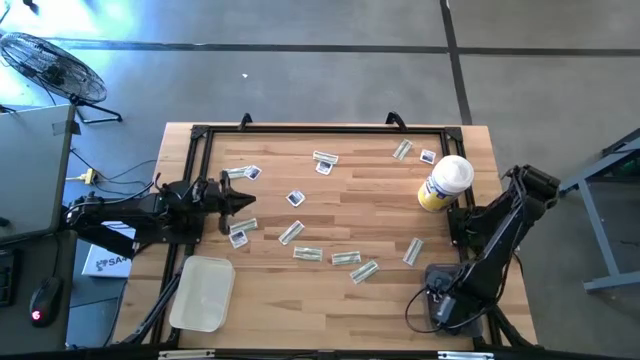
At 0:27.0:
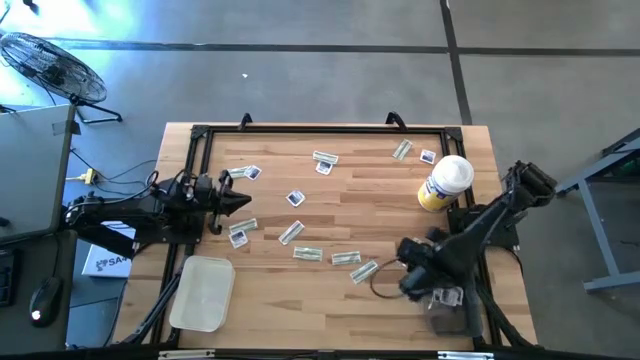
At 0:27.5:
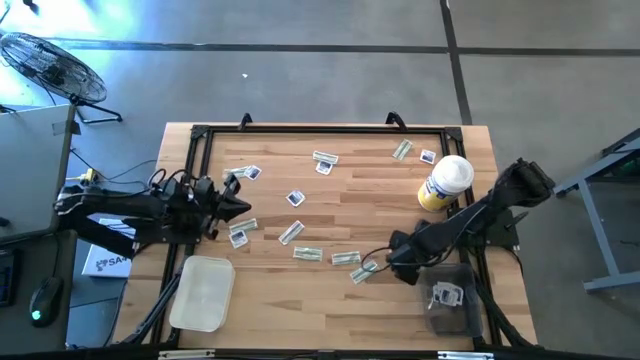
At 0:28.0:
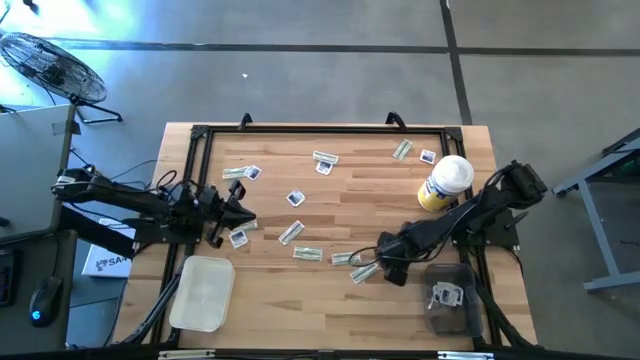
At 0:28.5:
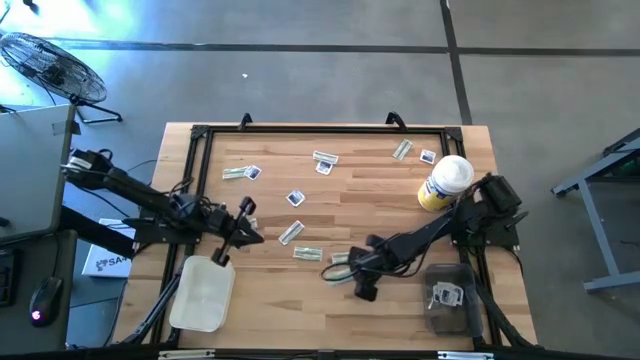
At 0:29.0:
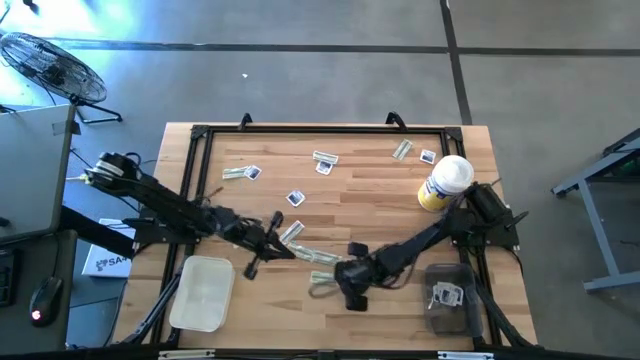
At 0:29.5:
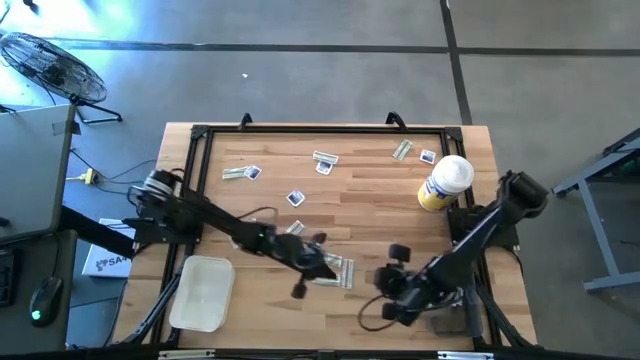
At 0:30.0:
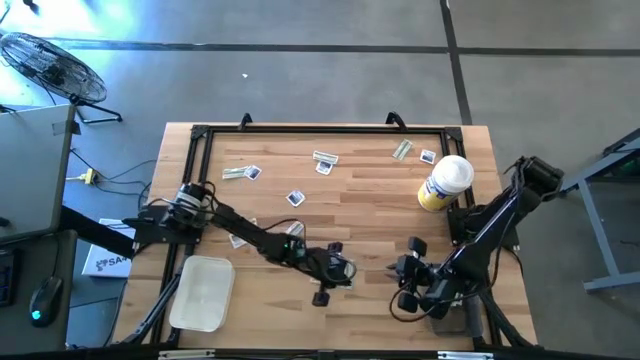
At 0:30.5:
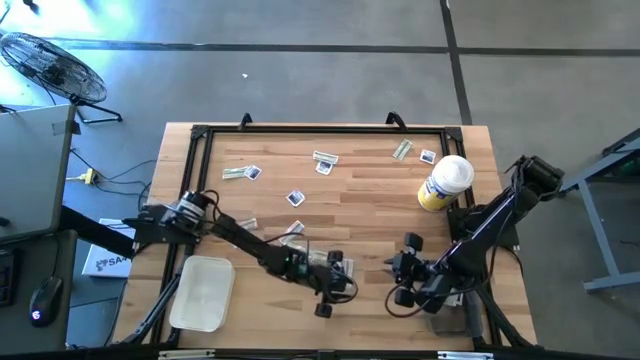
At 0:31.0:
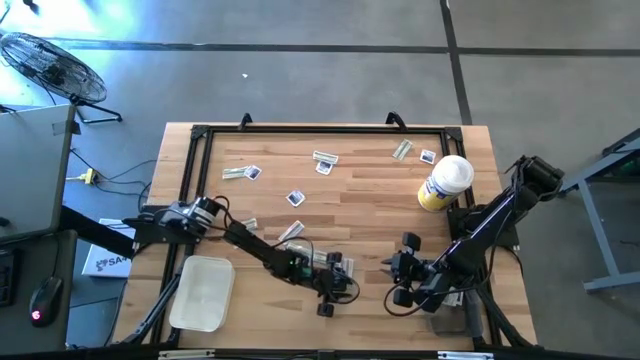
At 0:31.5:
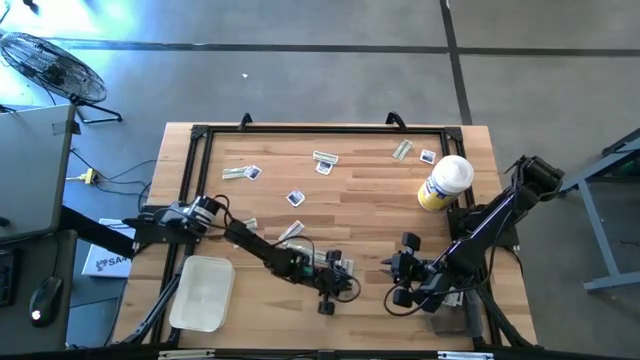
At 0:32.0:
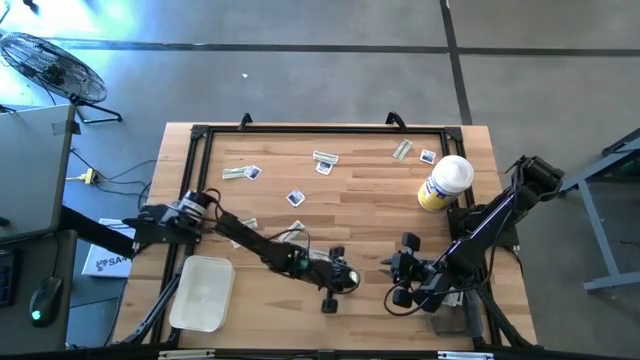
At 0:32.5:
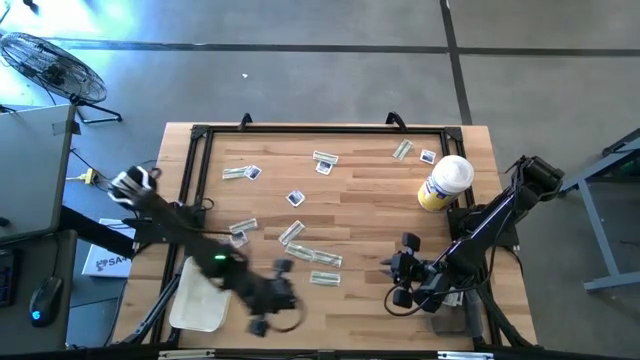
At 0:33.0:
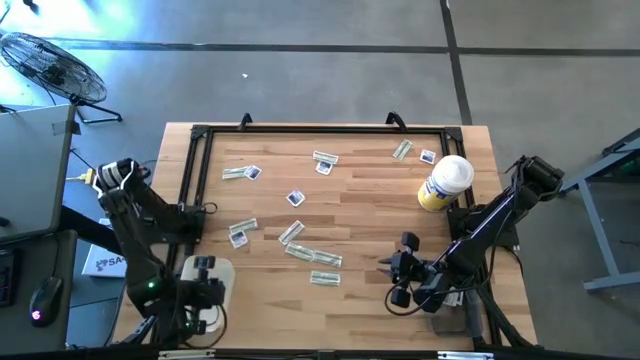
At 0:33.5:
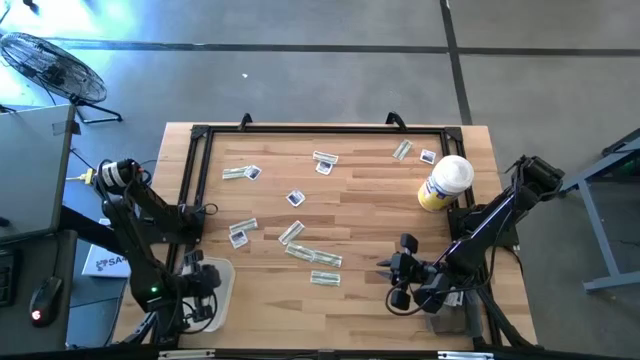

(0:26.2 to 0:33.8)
Task: Pick & Place First Aid Supplies
Put the green bandage into the white bin

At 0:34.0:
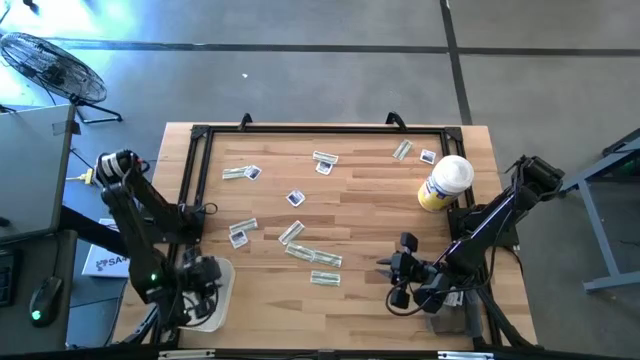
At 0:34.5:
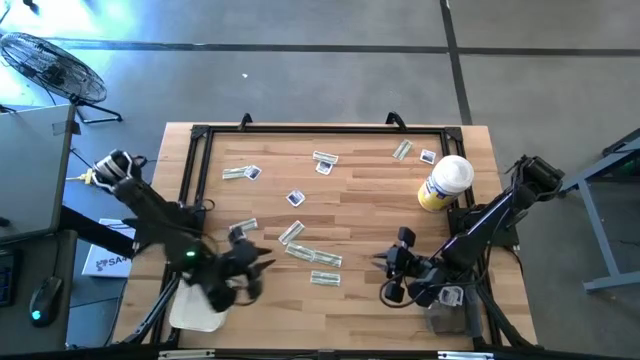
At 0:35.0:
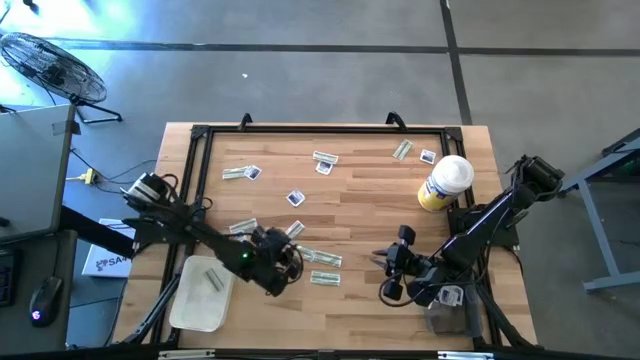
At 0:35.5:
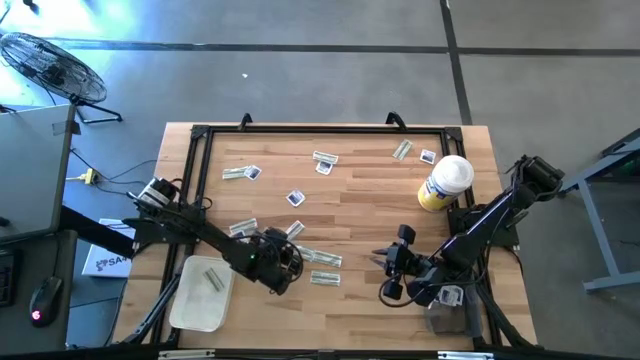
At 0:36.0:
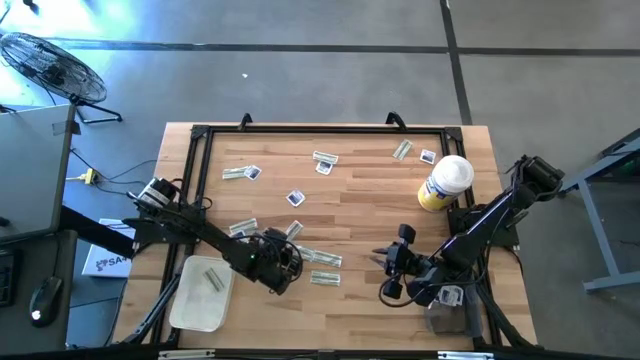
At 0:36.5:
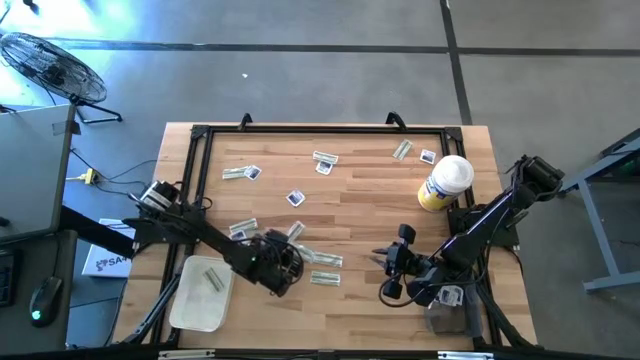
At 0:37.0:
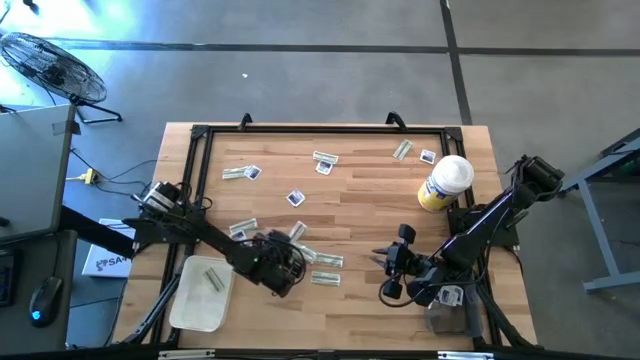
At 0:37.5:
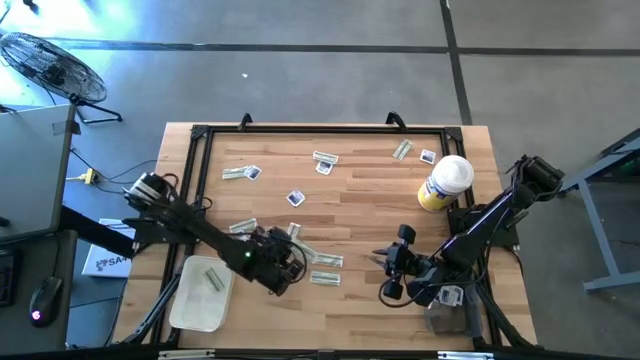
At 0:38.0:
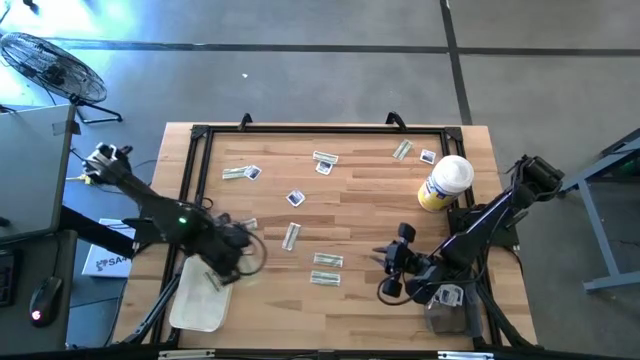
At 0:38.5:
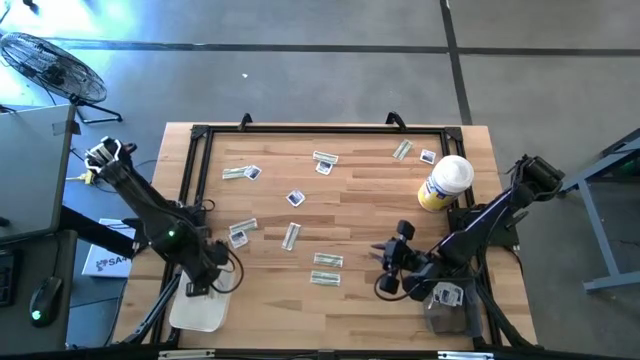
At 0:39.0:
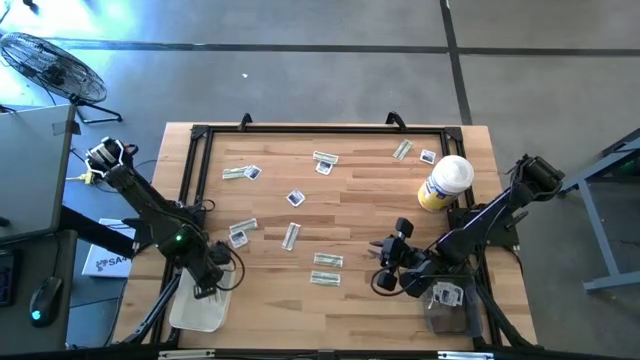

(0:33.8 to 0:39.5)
Put the green bandage into the white bin

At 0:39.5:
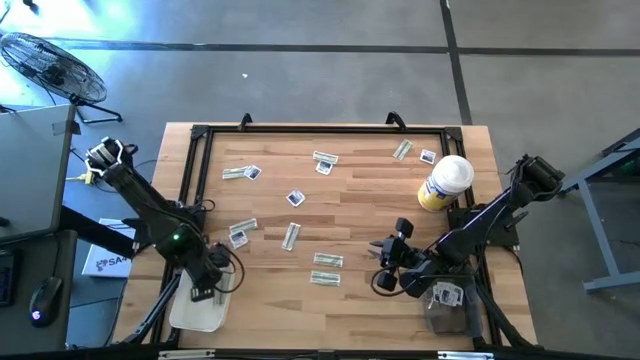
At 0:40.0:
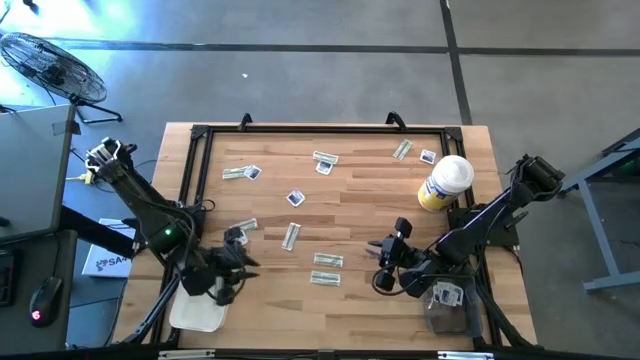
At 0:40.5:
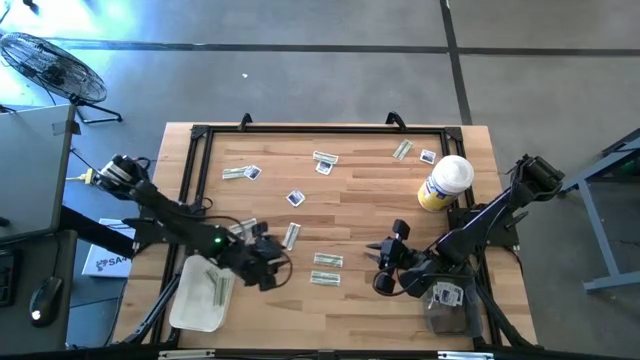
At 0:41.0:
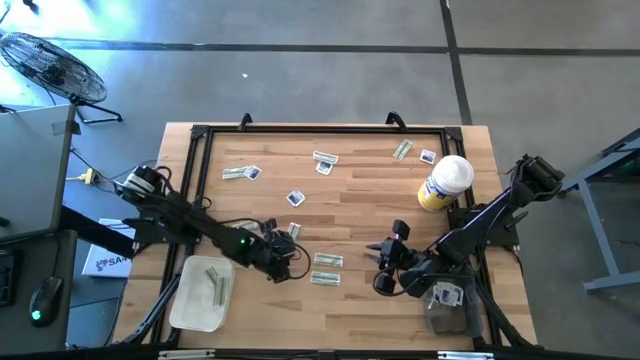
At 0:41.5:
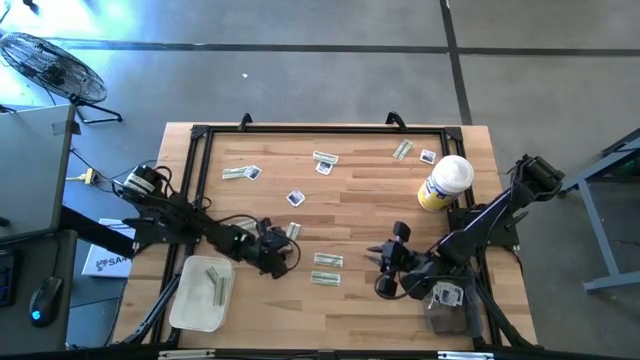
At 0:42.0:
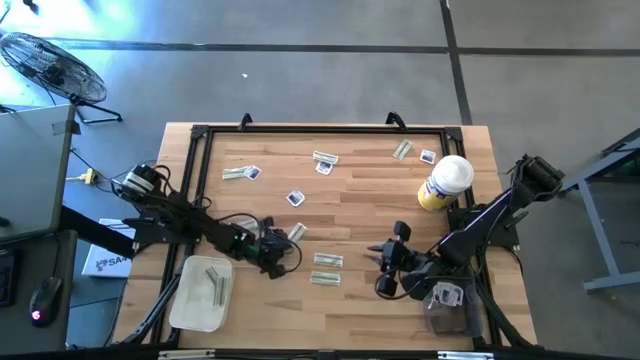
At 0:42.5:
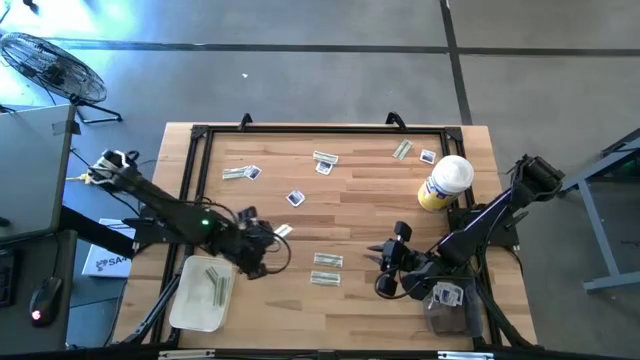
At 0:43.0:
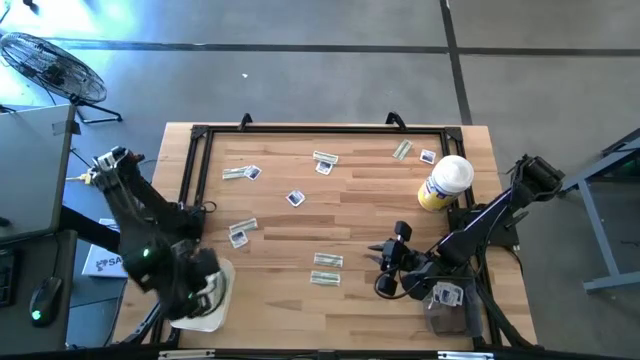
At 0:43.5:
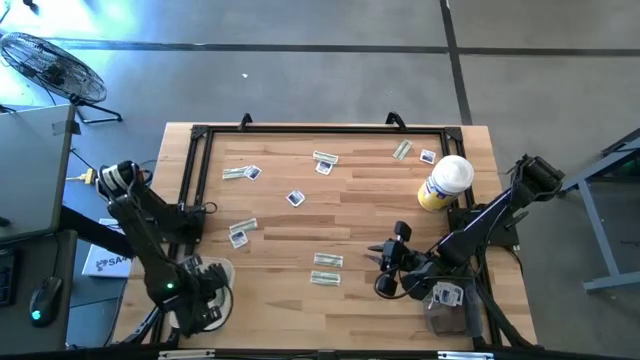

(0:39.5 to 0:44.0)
Put the green bandage into the white bin

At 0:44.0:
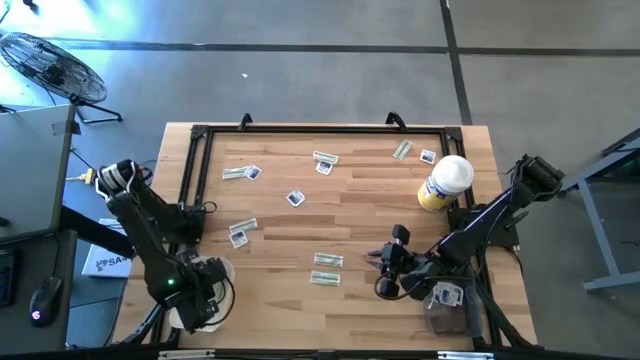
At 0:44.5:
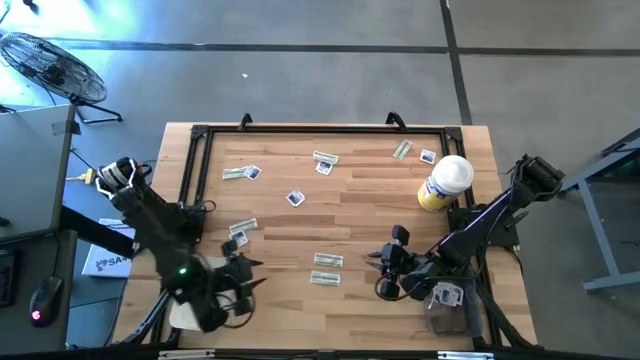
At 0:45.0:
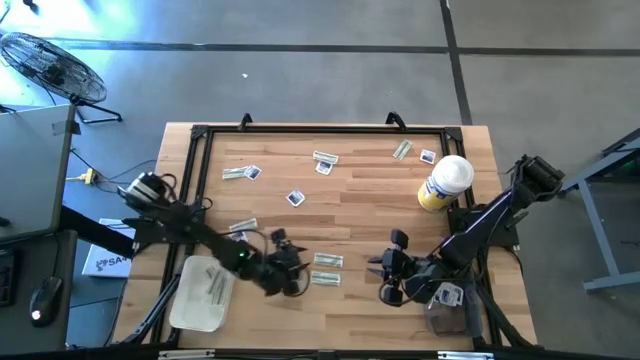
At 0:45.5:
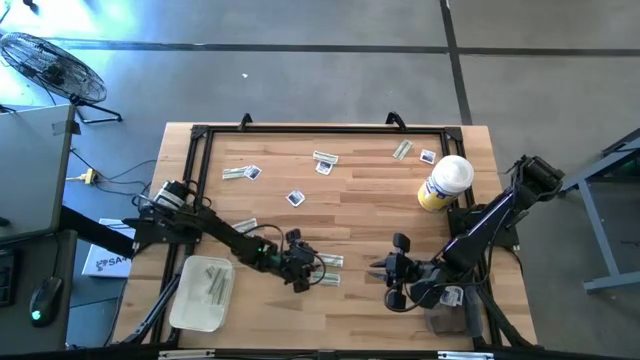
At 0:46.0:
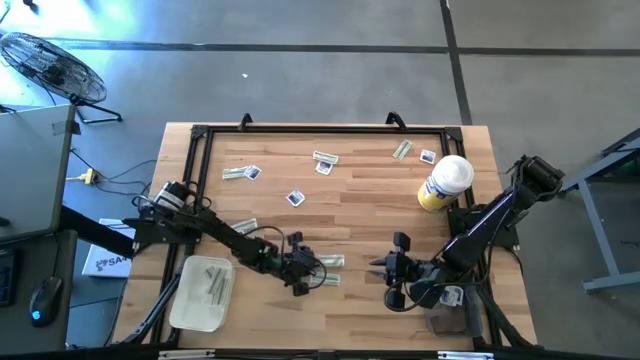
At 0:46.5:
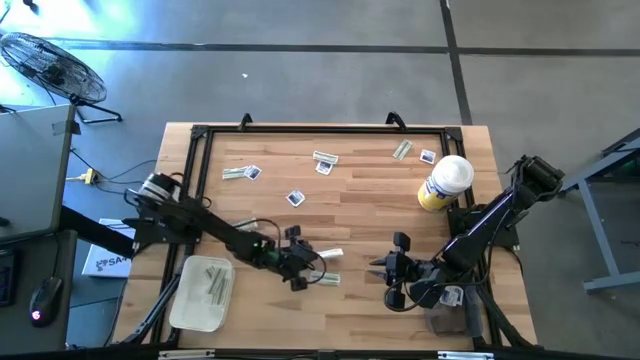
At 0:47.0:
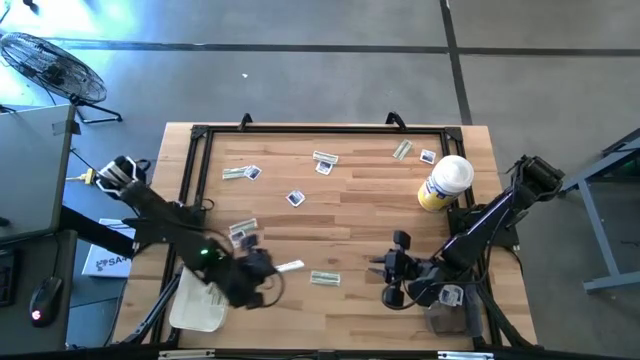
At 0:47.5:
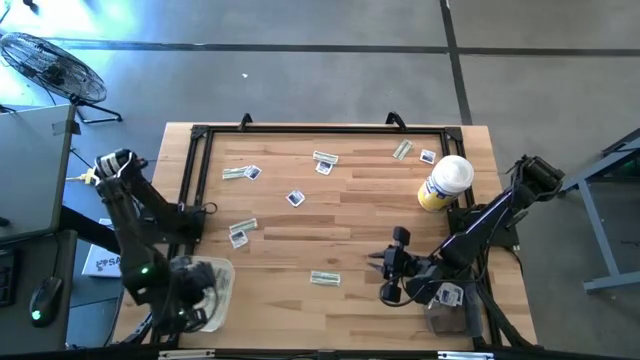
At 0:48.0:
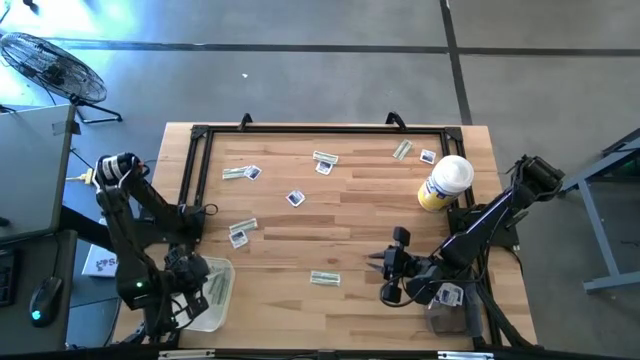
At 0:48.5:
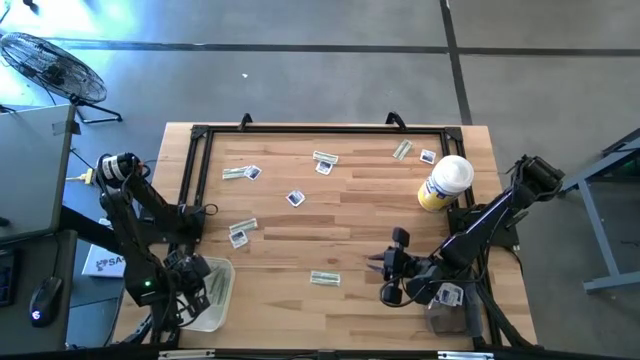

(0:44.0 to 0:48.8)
Put the green bandage into the white bin
